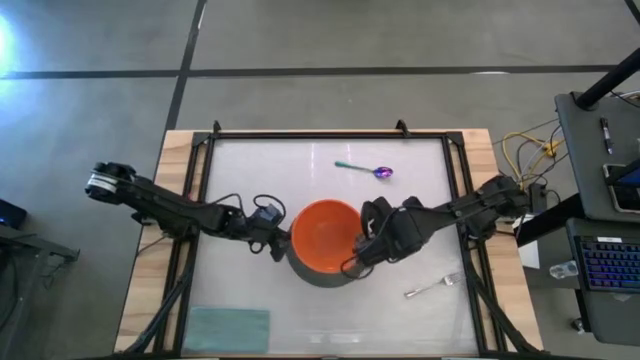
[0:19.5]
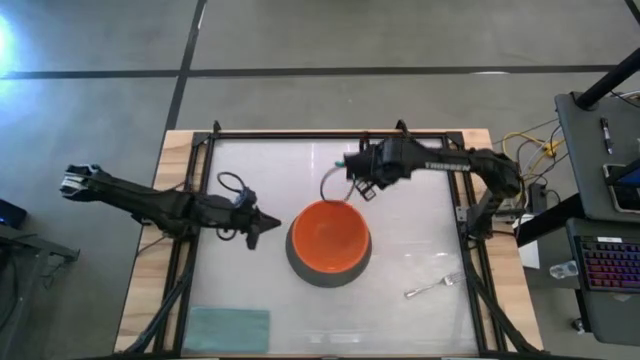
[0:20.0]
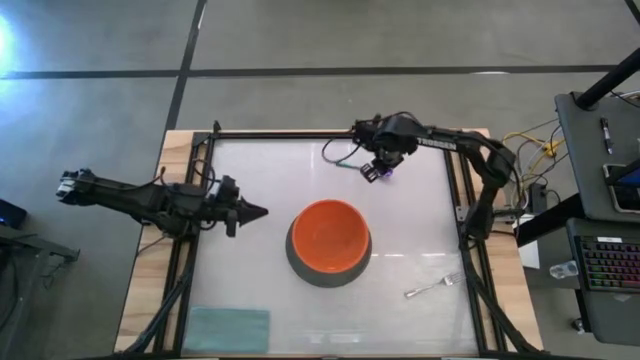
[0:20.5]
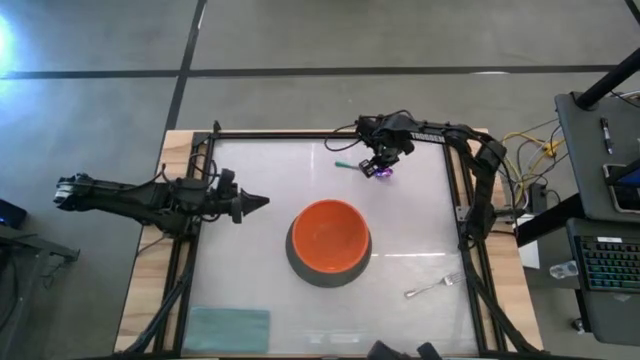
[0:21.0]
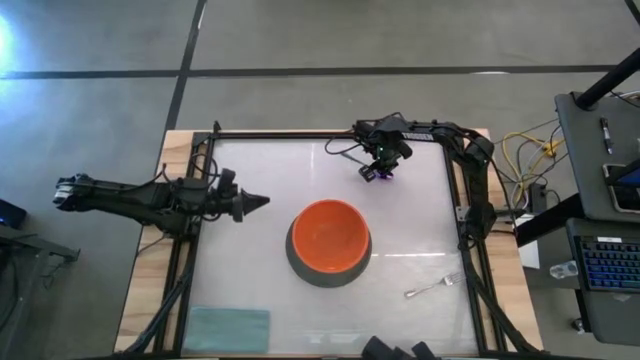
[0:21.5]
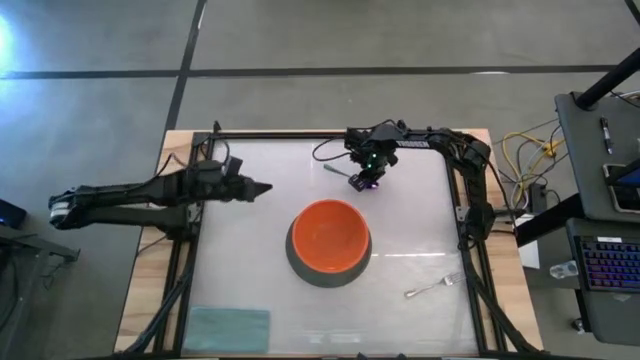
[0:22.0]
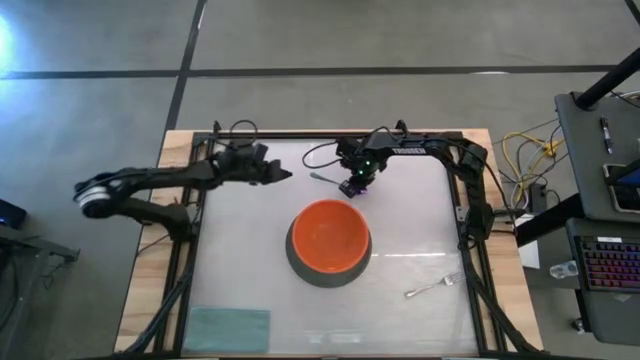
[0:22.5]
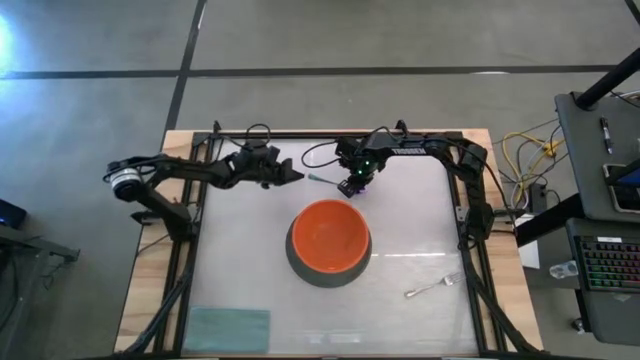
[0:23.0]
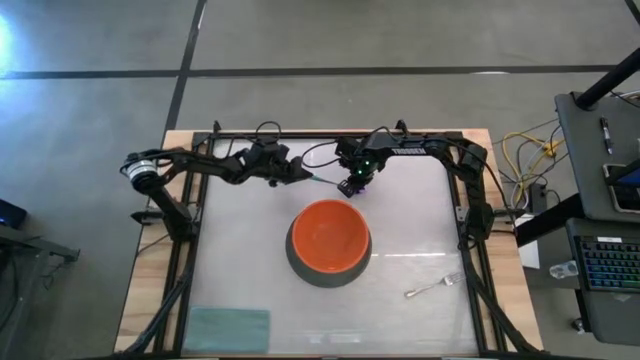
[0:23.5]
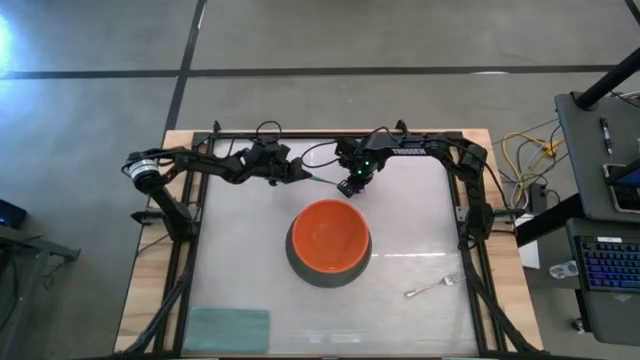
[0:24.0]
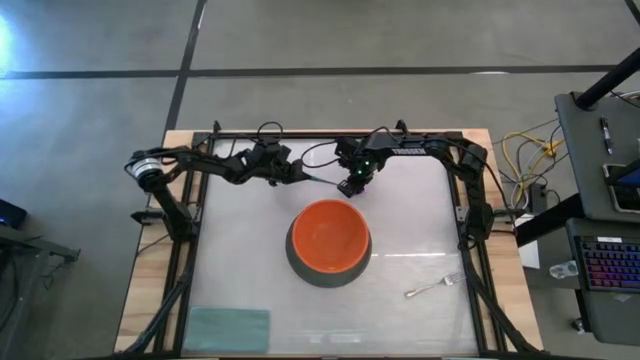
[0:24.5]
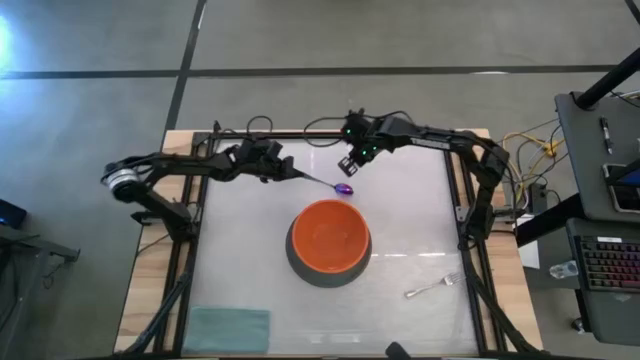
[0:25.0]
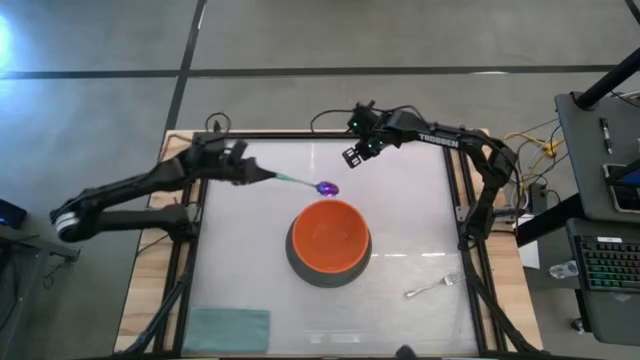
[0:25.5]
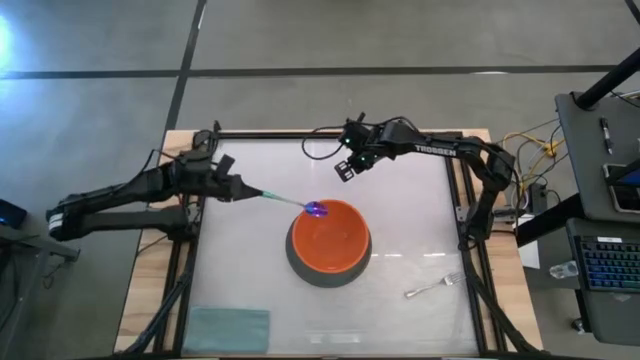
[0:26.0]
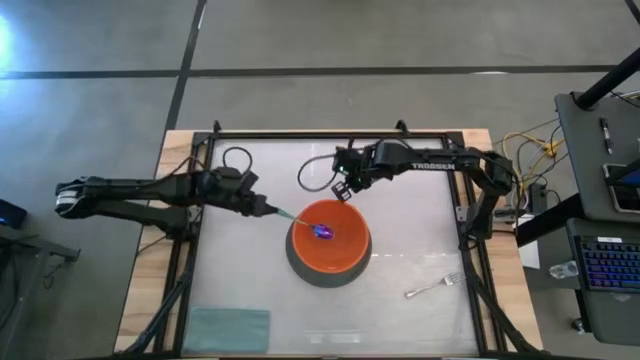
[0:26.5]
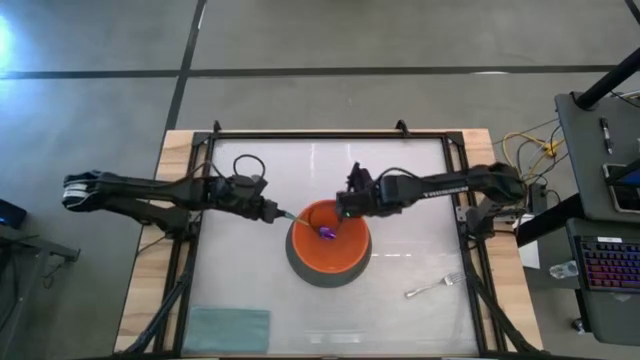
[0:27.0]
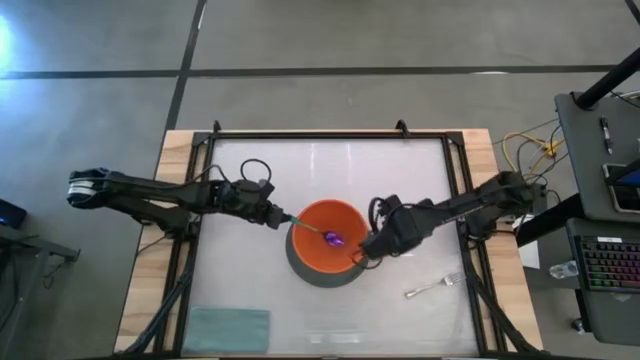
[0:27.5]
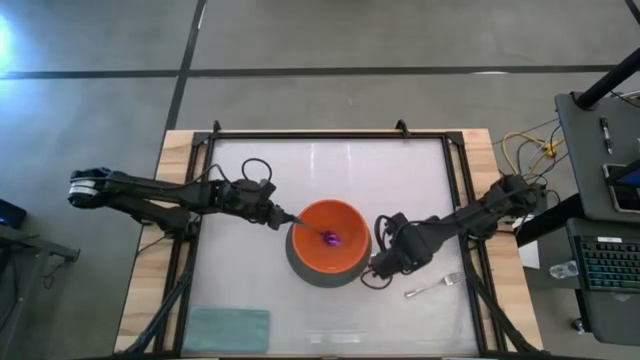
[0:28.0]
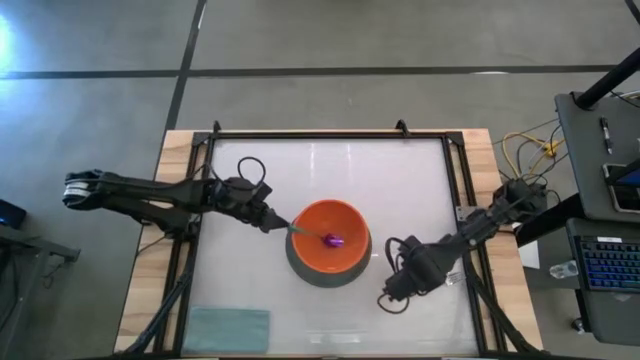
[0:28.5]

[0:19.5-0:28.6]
Task: Set table place
Put the spoon on the orange bowl

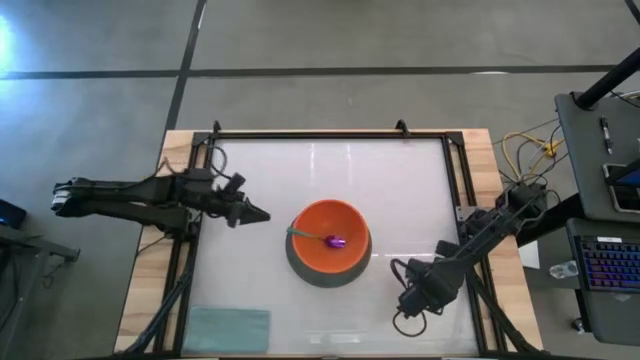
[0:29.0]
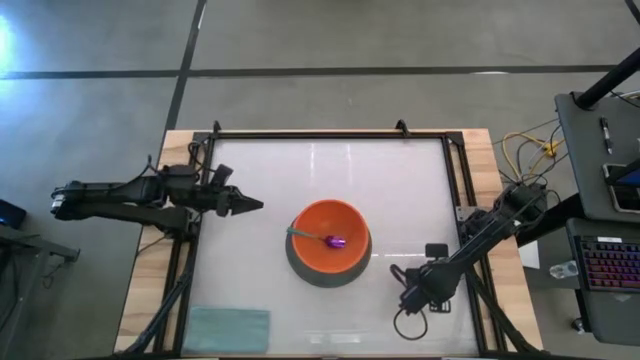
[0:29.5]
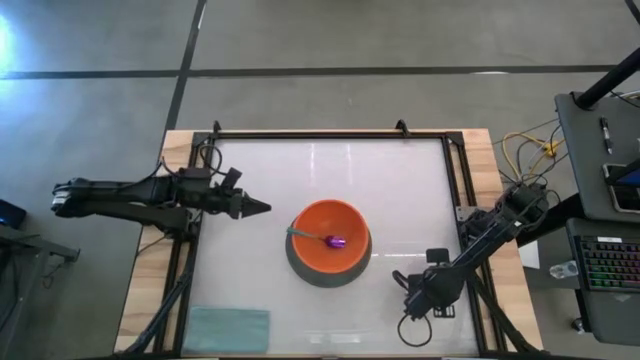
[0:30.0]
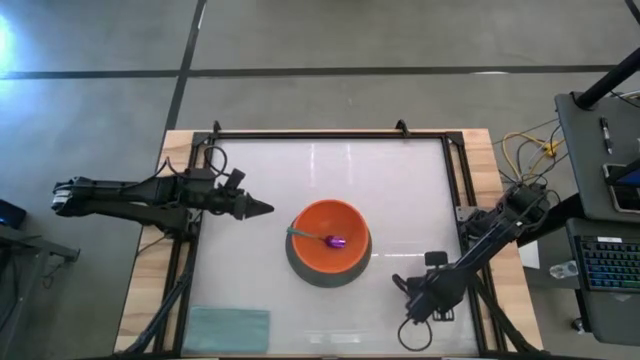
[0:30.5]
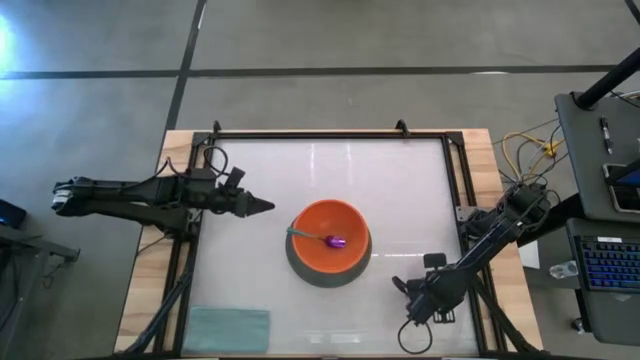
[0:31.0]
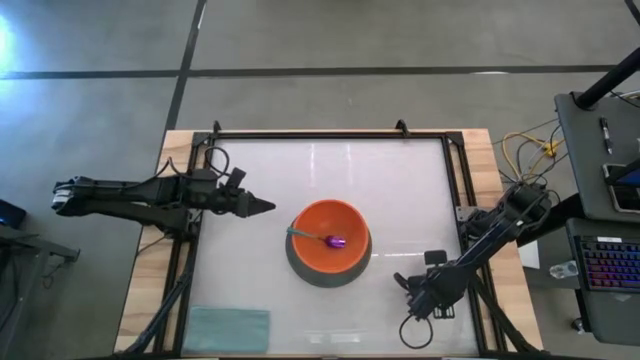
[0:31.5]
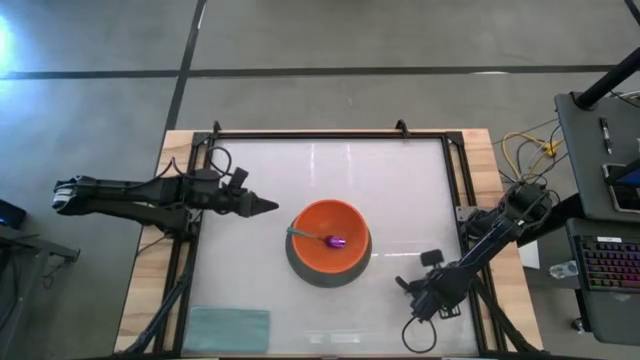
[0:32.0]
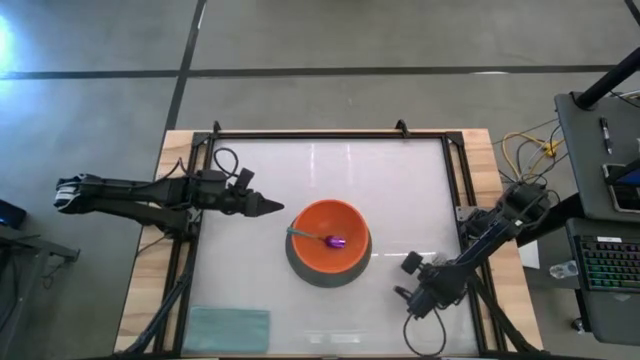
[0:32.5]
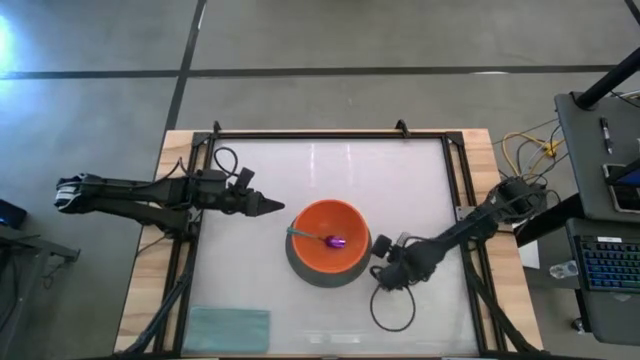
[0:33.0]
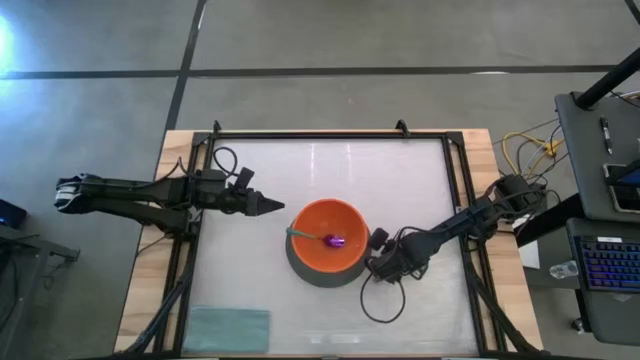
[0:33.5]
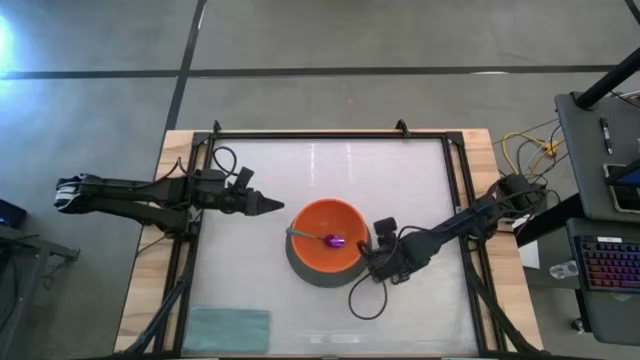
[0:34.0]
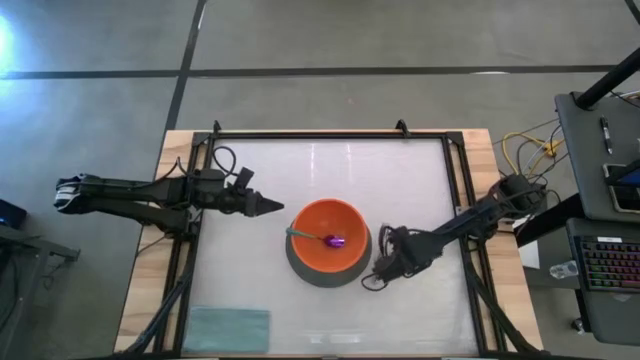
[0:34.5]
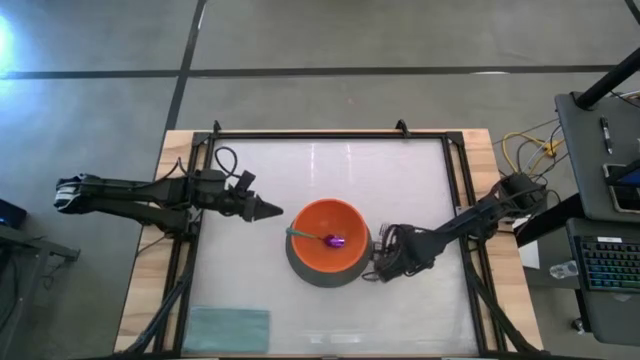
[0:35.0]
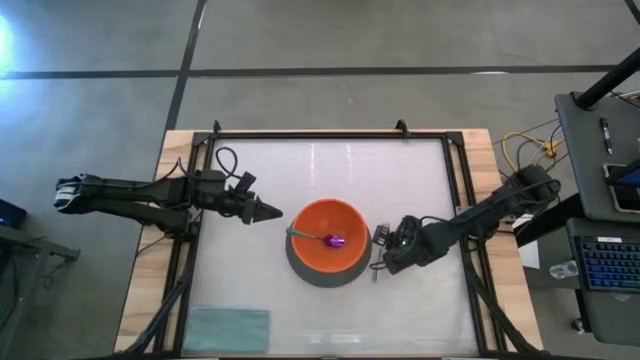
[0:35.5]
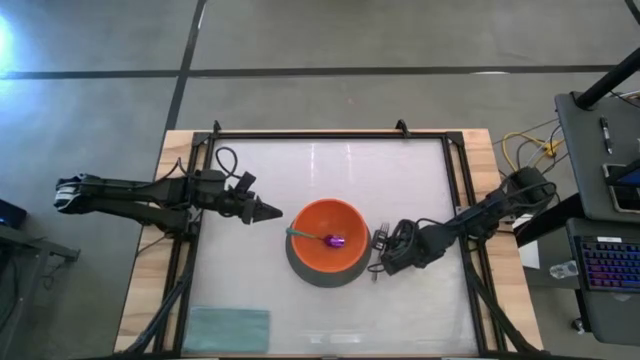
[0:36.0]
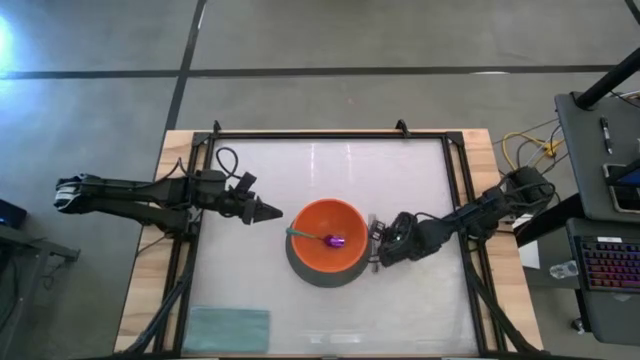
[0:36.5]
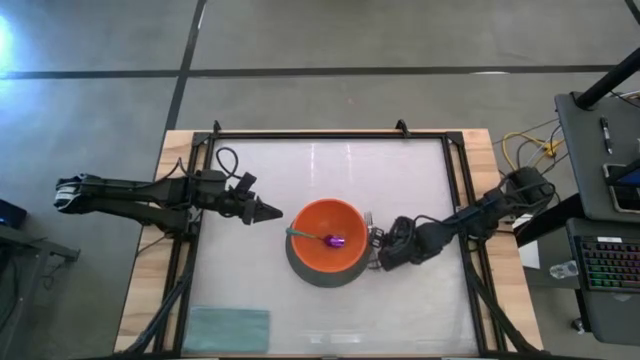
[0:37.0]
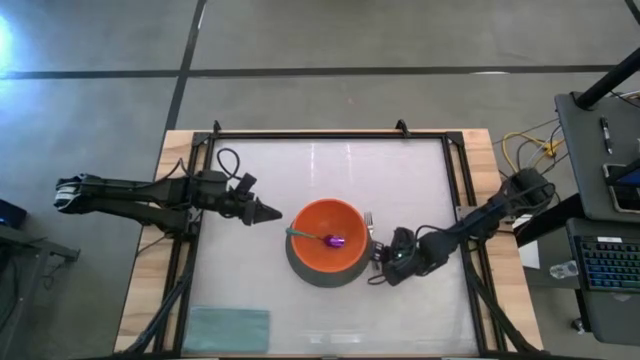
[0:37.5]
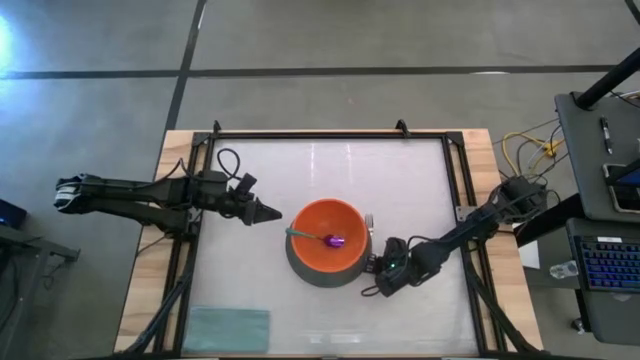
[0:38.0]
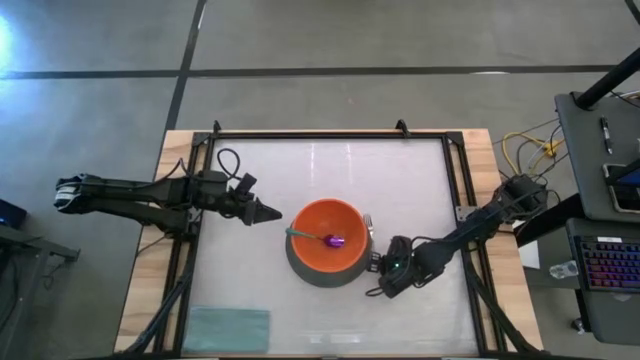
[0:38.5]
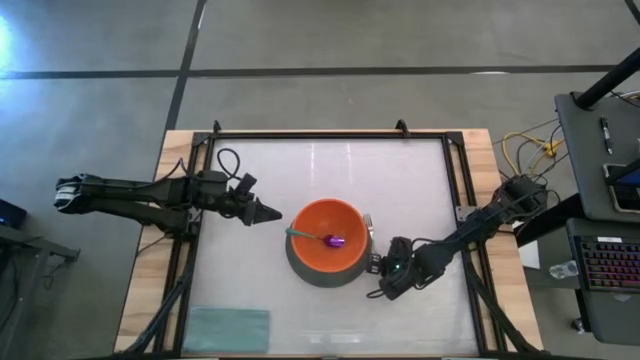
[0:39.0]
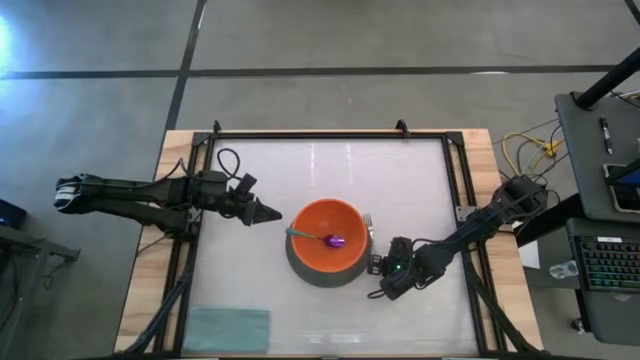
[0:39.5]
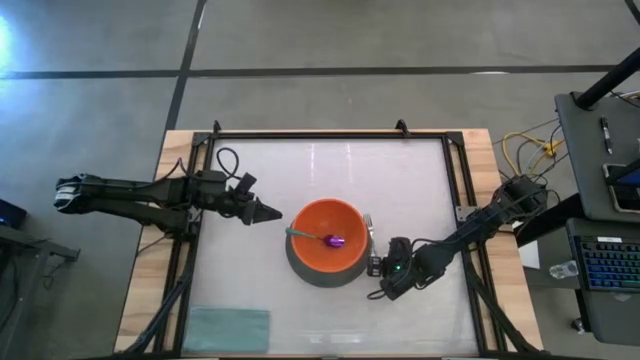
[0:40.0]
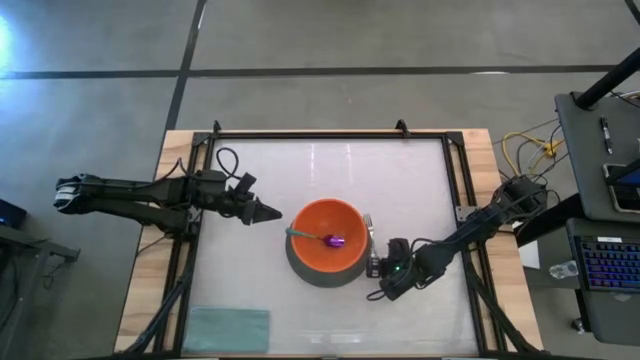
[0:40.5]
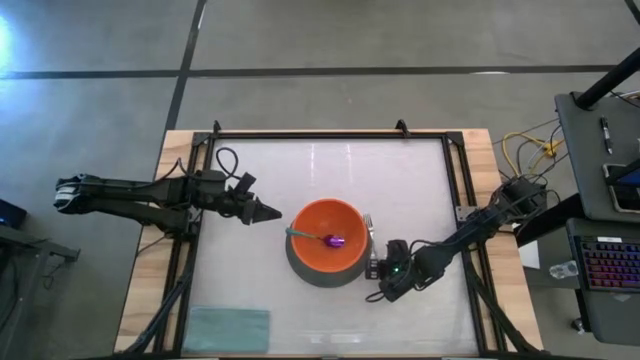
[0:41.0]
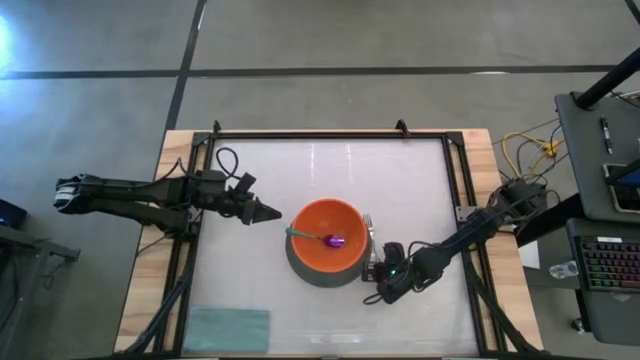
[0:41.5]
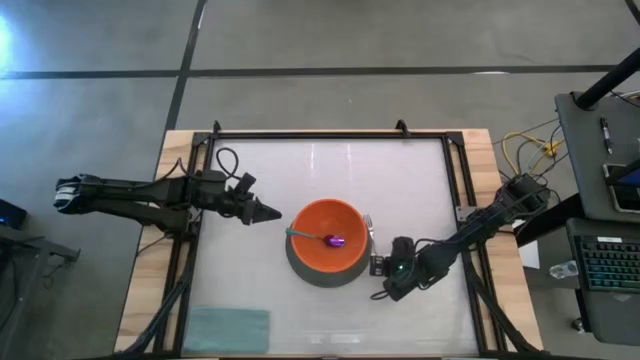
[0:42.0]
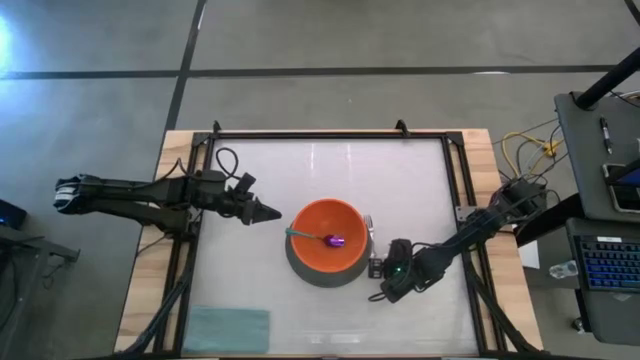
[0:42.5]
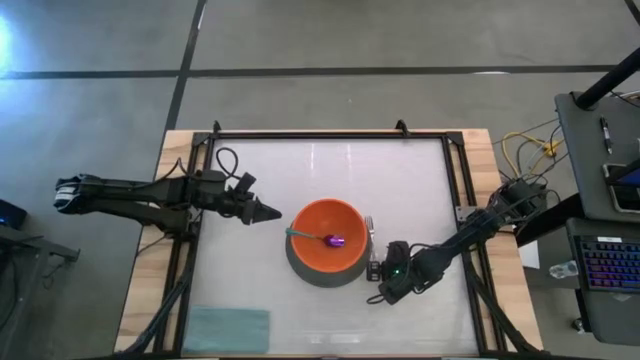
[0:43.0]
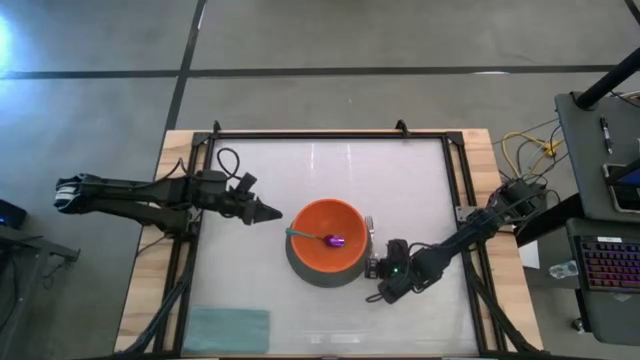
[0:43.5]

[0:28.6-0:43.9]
Put the fork to the right of the gray plate
